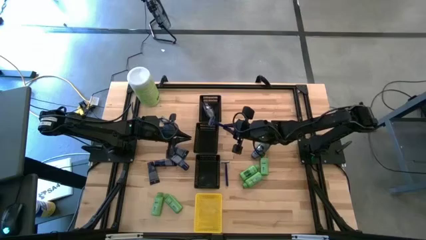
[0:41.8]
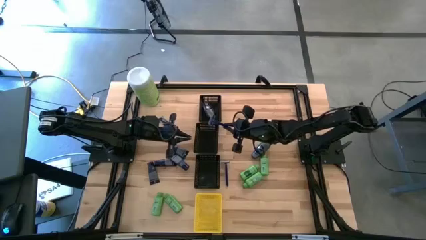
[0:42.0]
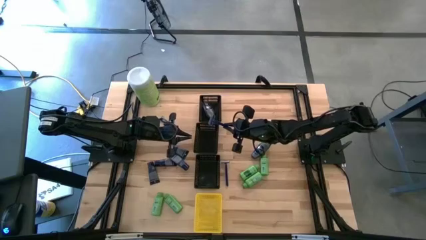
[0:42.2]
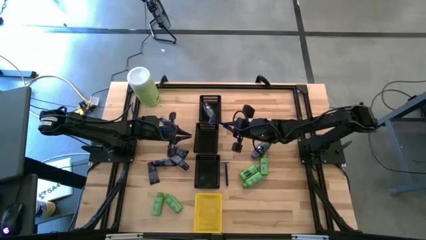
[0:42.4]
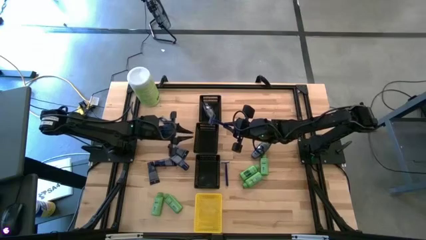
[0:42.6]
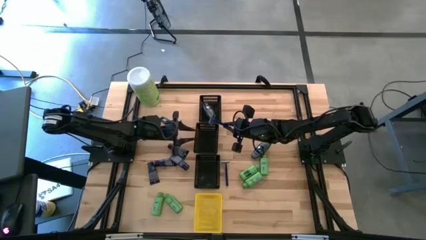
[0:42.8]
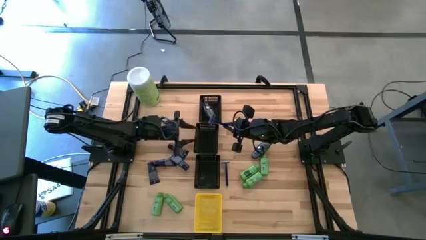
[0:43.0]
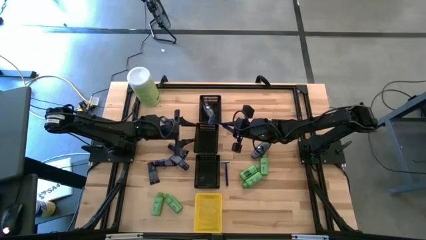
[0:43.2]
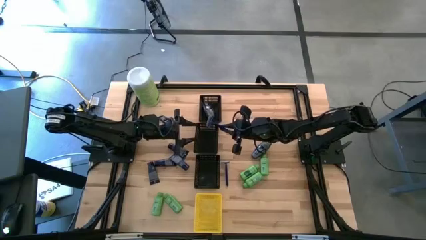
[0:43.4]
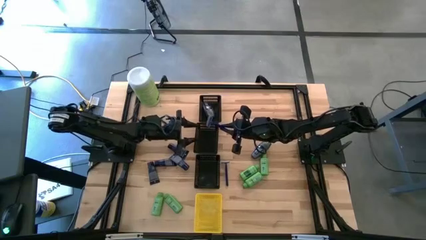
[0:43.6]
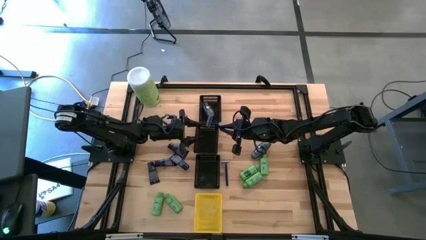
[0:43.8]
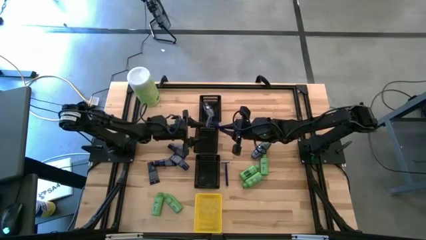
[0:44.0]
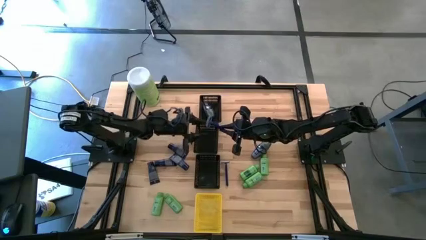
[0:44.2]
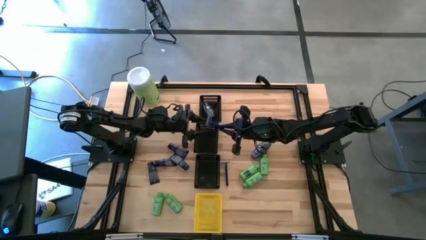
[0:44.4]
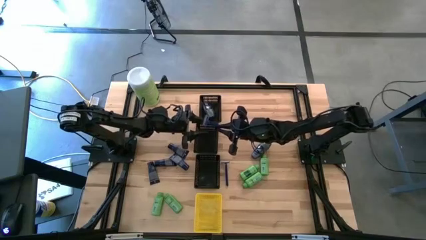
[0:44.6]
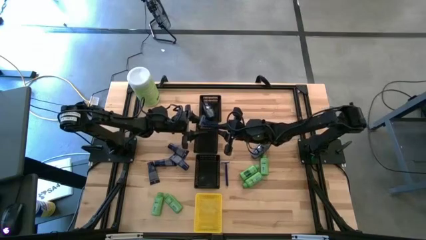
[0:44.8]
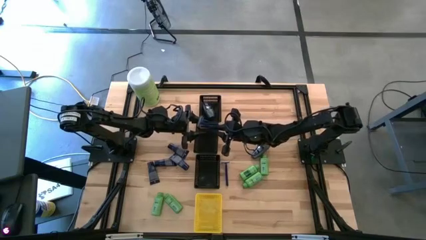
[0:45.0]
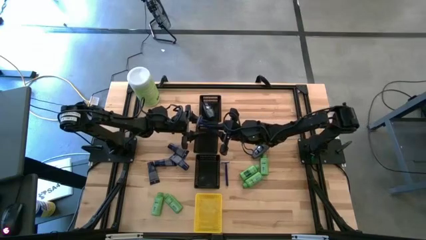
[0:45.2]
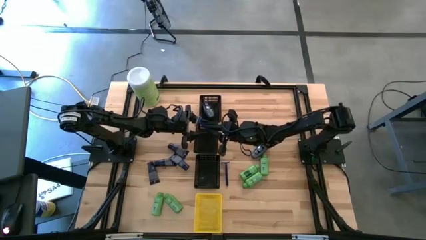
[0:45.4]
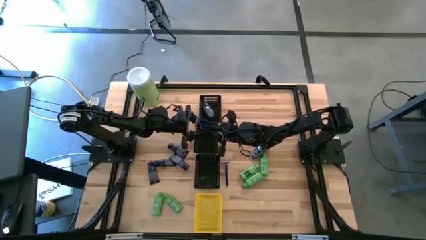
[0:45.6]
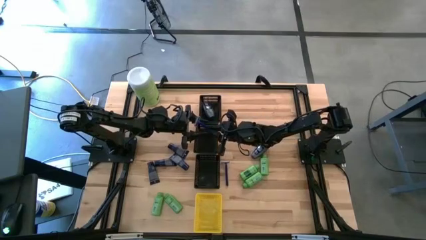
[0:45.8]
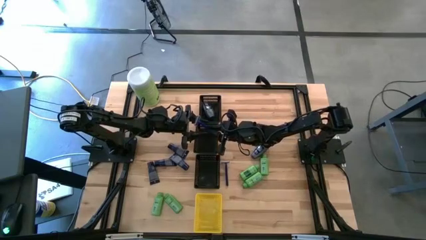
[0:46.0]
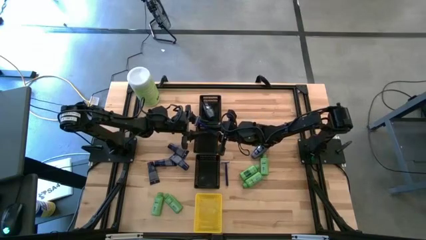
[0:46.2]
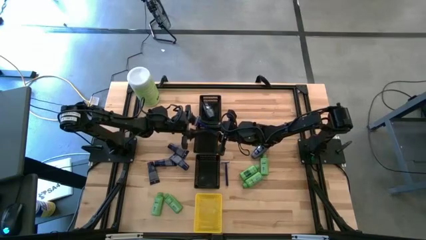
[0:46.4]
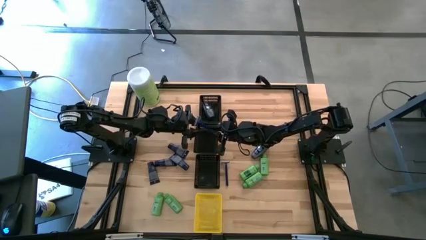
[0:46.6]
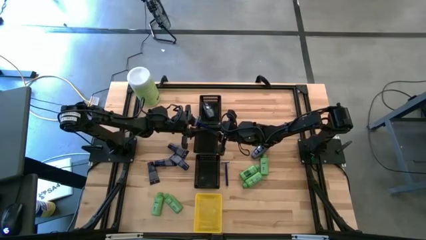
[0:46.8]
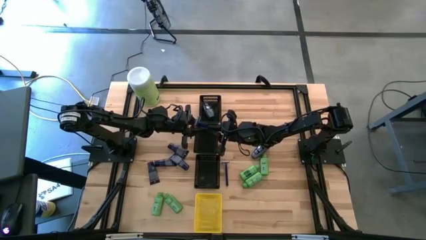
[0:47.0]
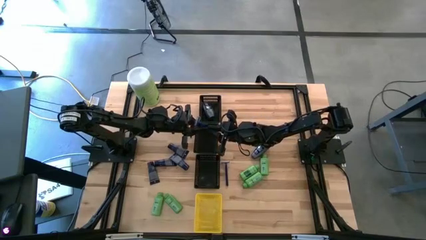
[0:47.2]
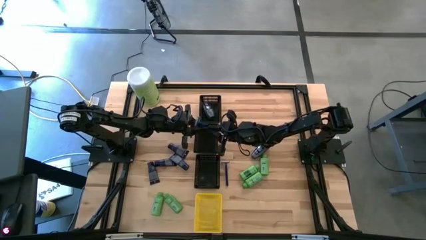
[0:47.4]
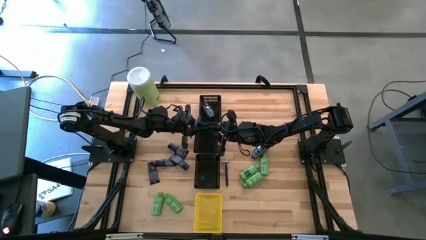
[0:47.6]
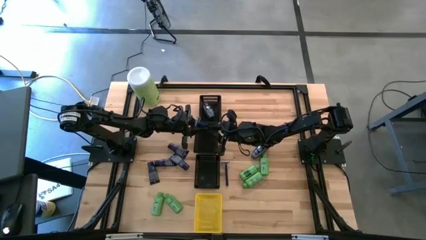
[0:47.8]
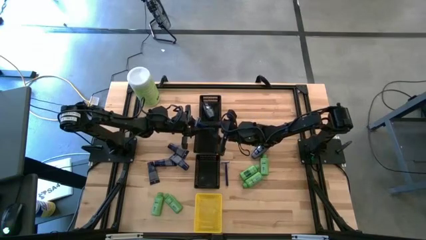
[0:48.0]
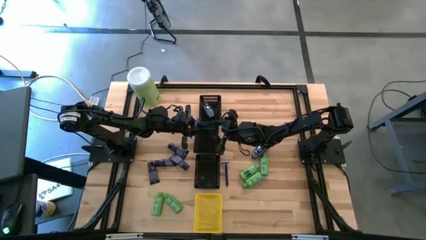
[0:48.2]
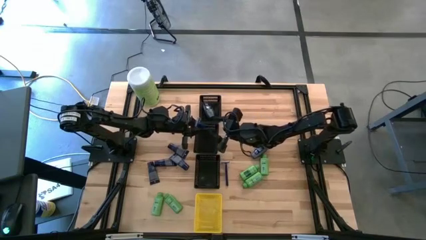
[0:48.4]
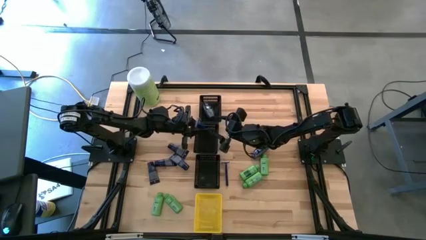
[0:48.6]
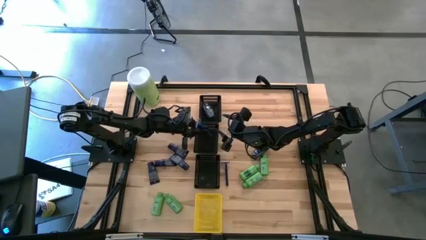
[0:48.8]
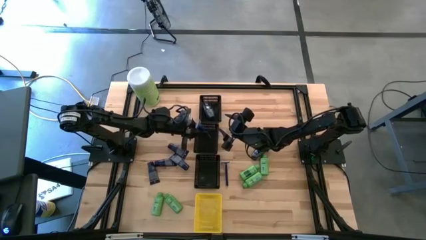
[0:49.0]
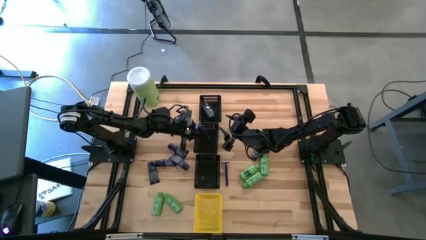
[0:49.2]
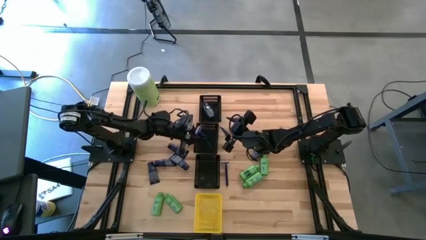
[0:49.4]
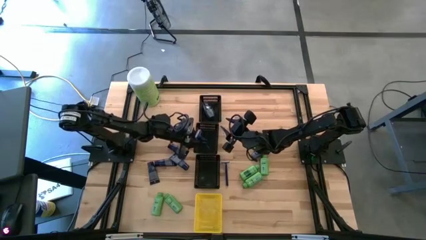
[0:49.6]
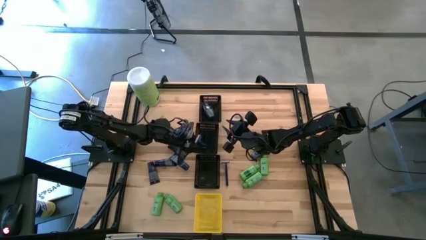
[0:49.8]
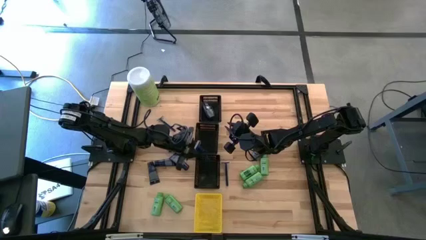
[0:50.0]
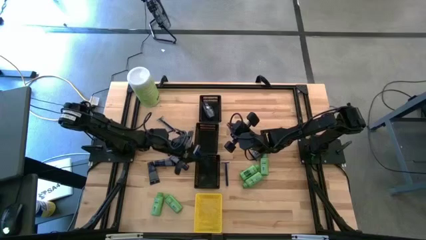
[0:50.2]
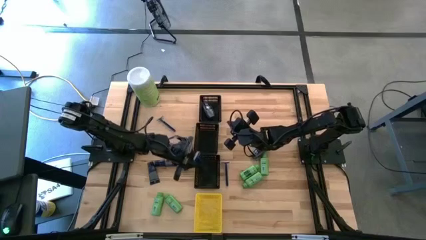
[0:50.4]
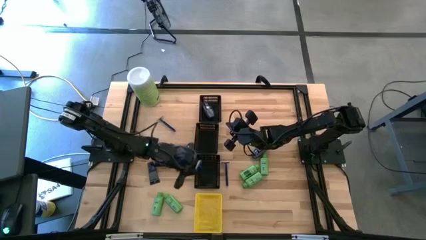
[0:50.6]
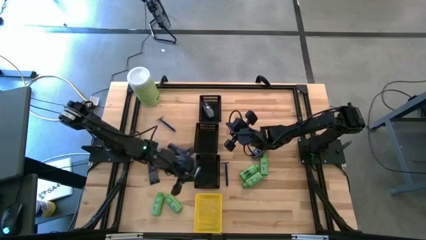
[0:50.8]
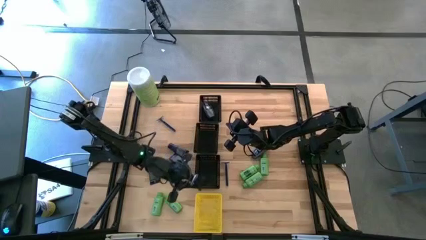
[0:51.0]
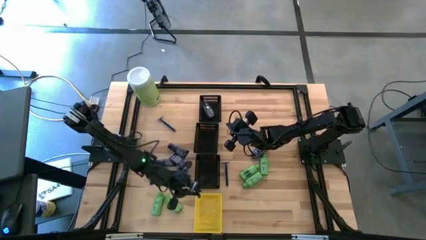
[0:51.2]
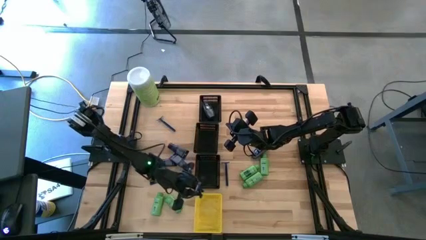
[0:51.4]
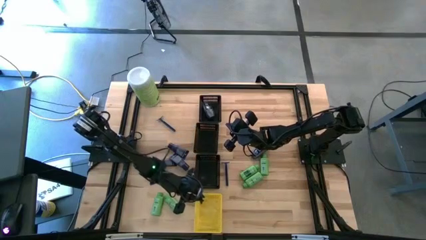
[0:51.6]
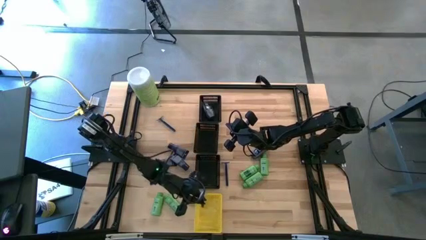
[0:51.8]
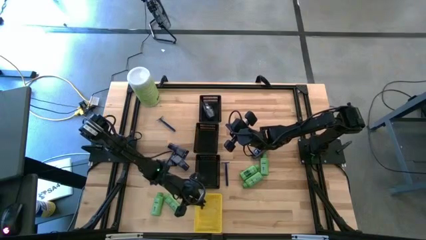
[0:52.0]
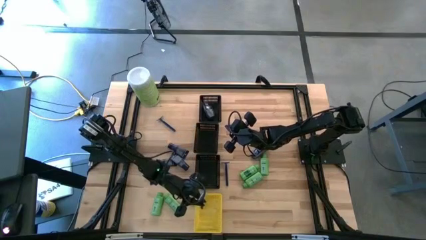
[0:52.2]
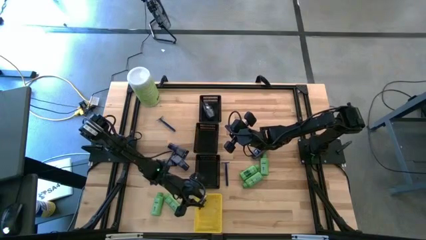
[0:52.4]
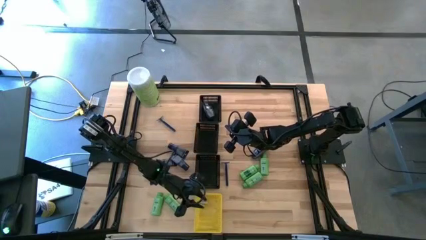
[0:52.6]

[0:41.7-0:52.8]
Task: Pick & Place Travel size toiletries
Put the blue razor into the yellow bin

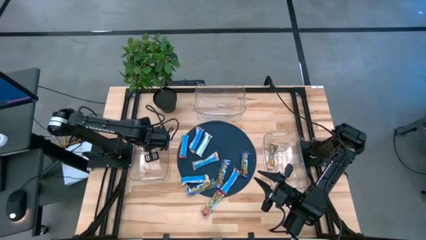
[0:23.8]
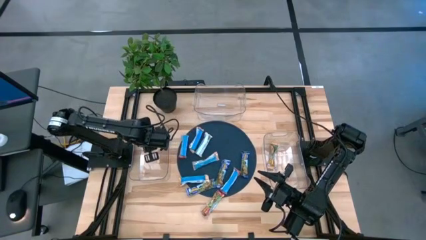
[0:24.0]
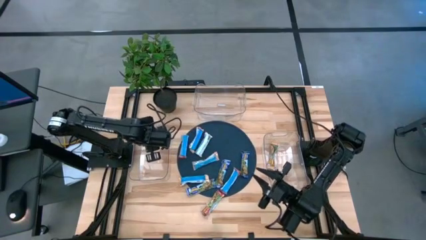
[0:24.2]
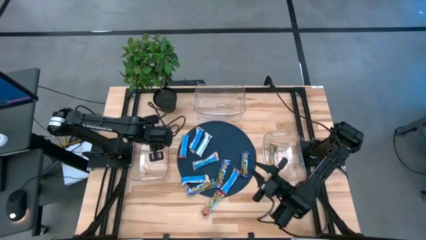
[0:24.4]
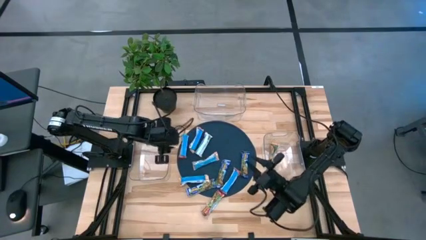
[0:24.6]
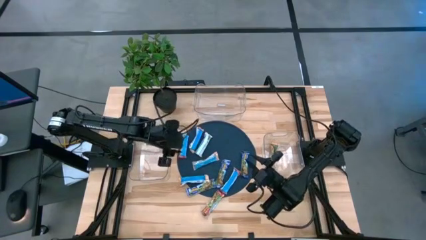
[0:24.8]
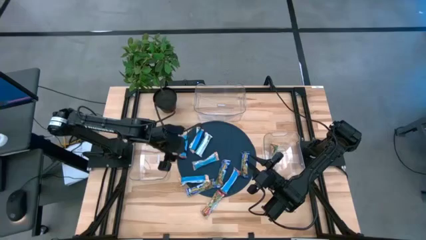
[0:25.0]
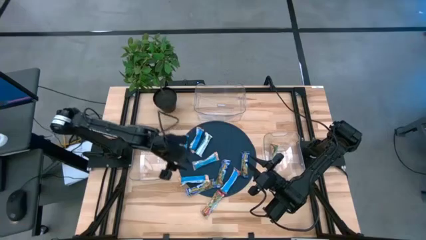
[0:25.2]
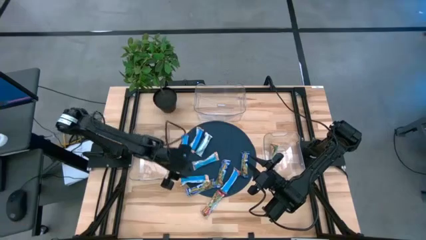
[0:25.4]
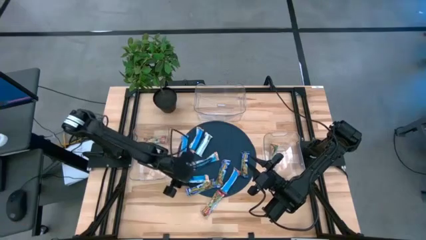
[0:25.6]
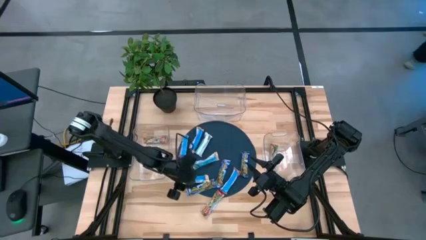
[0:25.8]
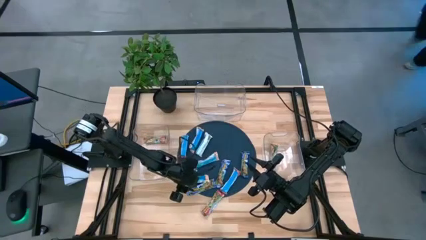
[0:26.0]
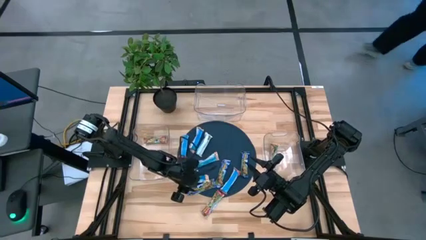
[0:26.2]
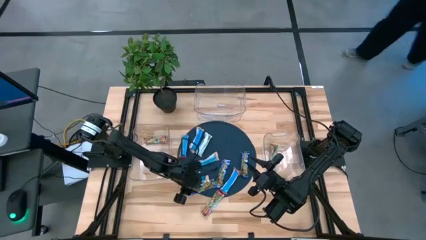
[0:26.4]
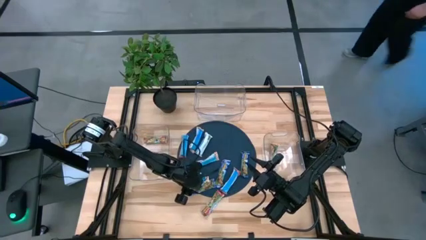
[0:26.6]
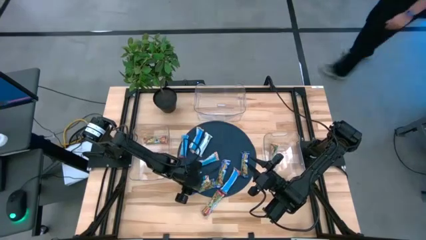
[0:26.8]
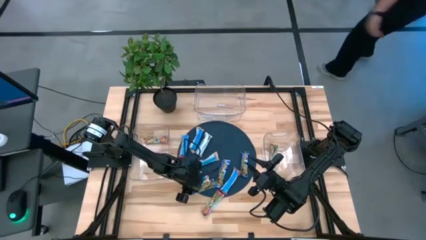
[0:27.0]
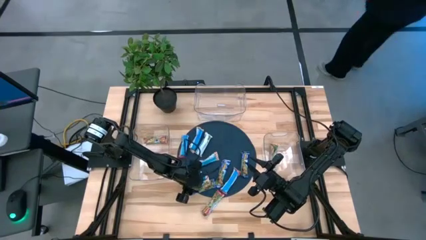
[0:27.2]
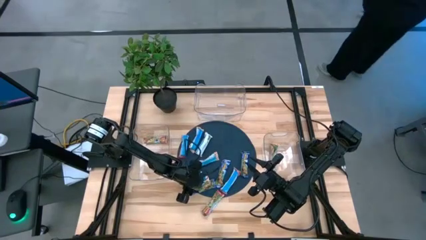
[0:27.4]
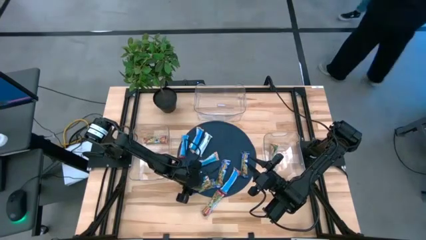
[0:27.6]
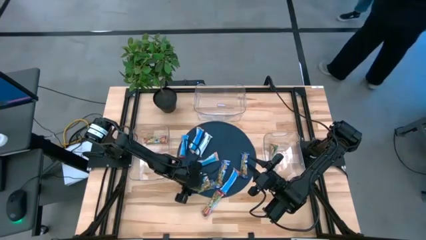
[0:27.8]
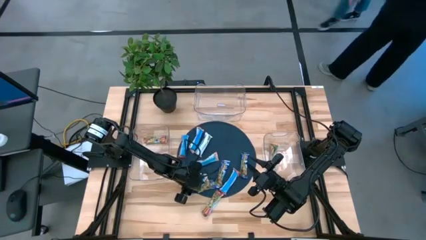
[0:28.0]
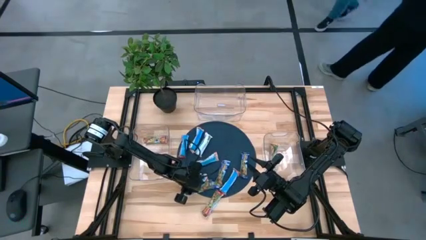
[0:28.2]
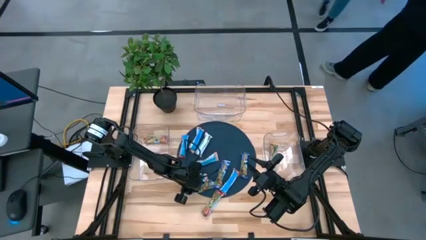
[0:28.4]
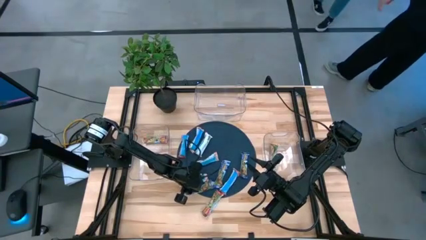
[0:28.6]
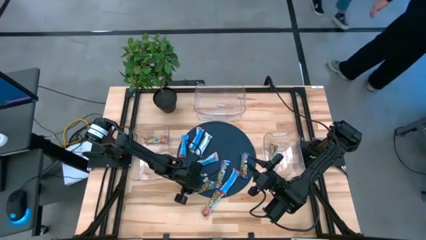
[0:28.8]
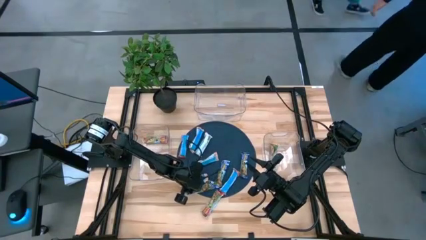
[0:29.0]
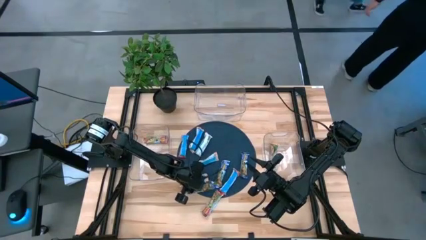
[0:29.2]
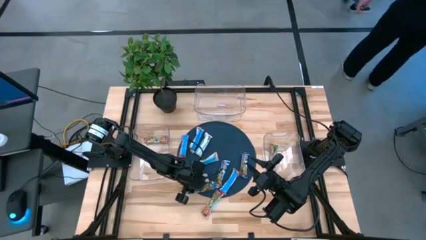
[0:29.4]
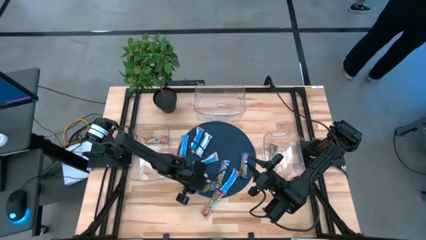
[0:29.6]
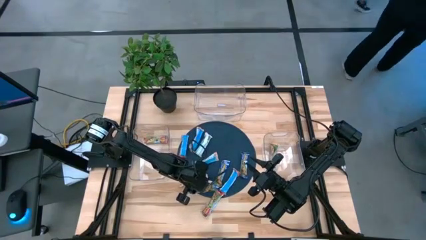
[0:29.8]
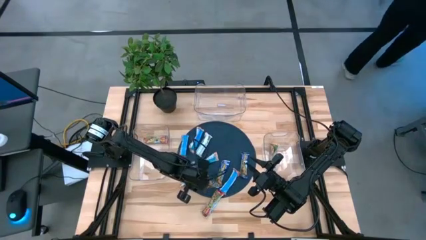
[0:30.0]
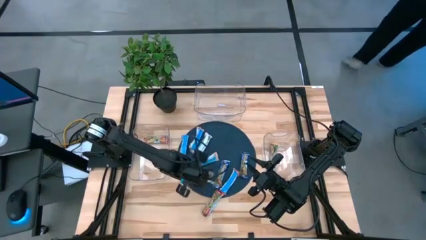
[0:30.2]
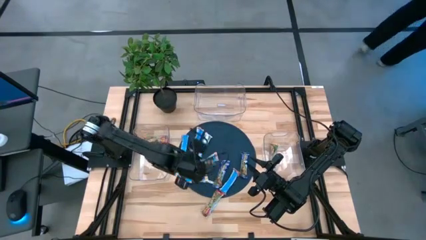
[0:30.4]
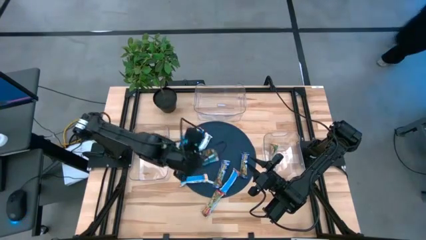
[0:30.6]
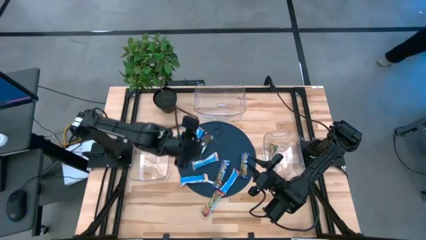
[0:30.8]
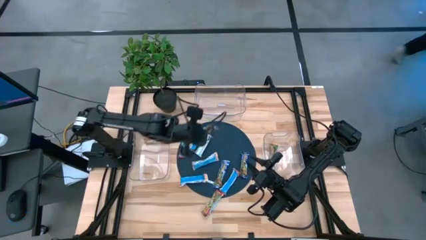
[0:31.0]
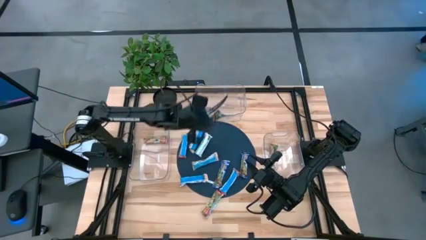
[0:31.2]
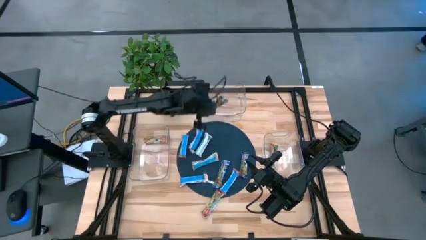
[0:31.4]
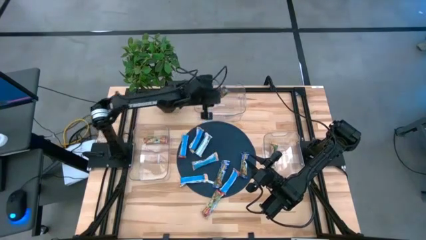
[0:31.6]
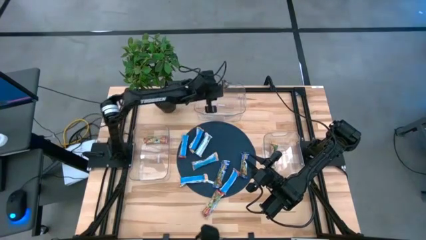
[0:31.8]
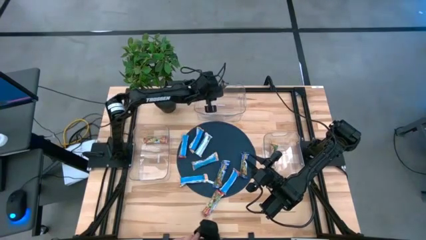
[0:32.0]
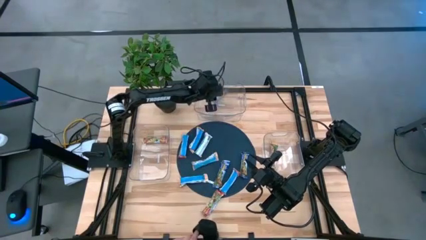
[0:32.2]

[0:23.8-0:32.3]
Task: Pick and place Granola Bars by type
Put the bottom left blue granola bar into the top transparent bin
